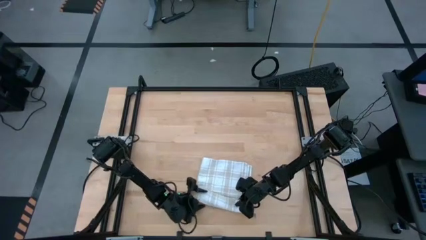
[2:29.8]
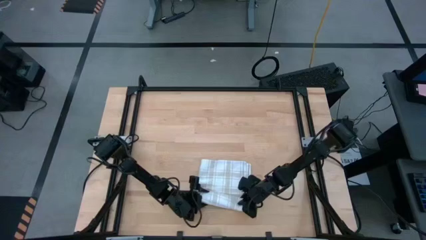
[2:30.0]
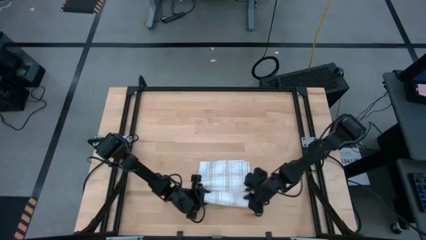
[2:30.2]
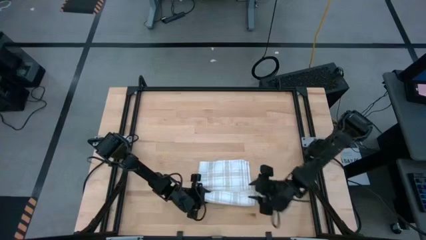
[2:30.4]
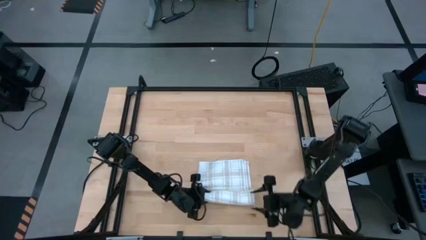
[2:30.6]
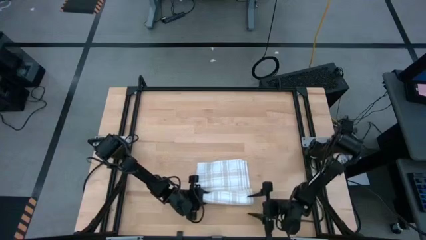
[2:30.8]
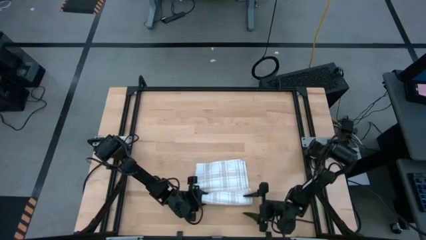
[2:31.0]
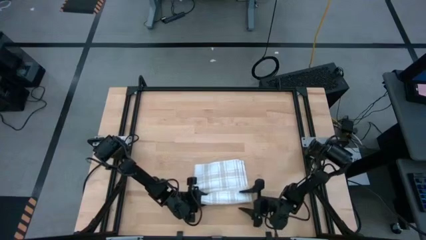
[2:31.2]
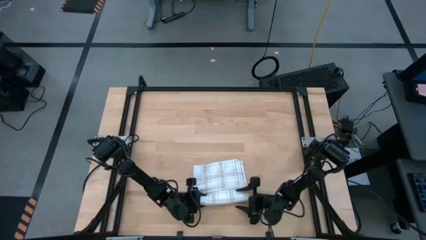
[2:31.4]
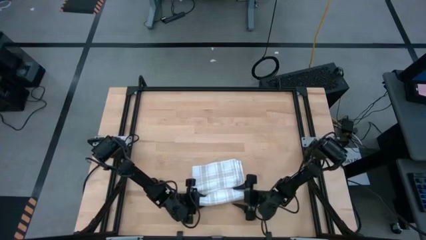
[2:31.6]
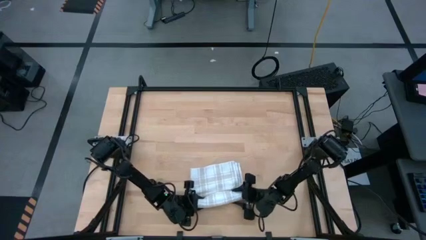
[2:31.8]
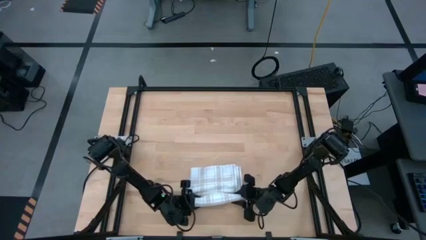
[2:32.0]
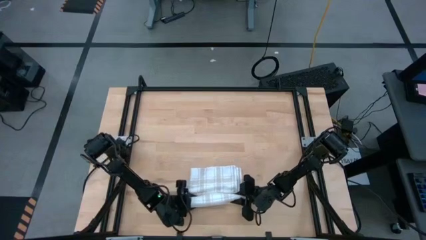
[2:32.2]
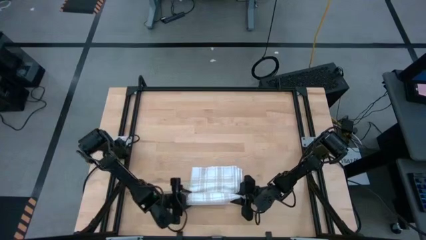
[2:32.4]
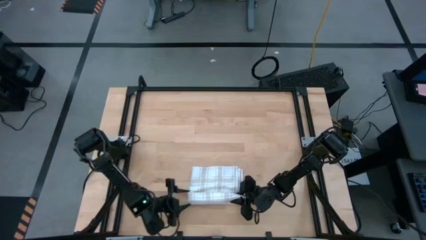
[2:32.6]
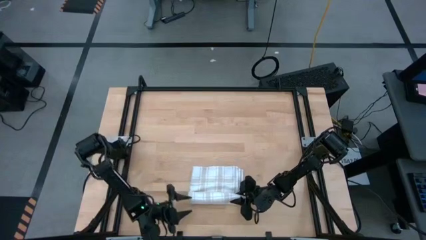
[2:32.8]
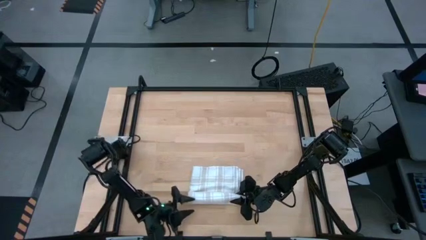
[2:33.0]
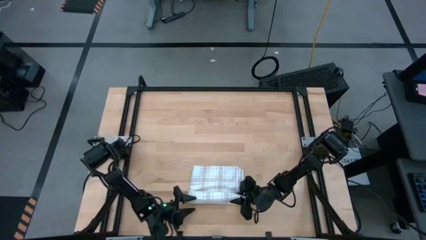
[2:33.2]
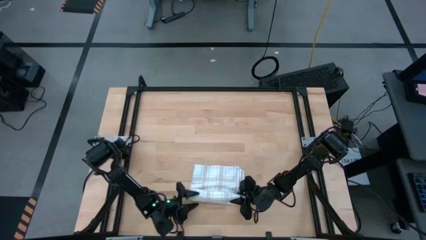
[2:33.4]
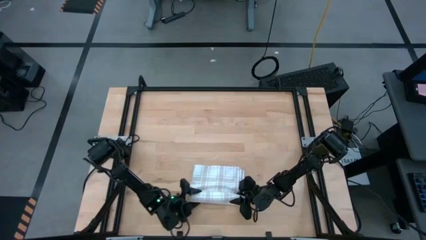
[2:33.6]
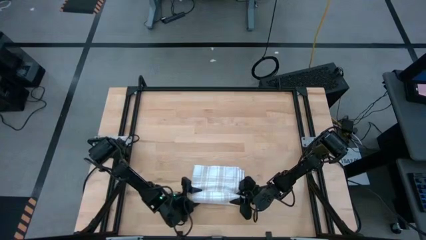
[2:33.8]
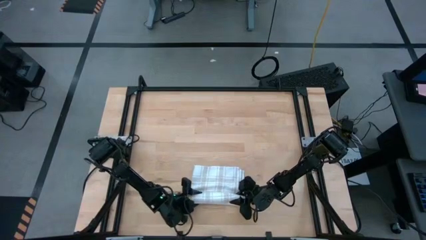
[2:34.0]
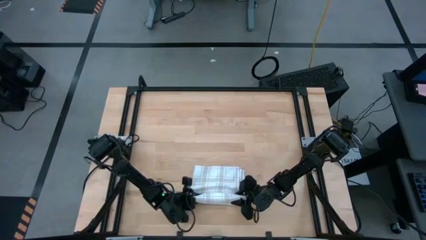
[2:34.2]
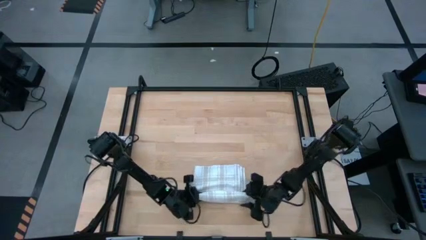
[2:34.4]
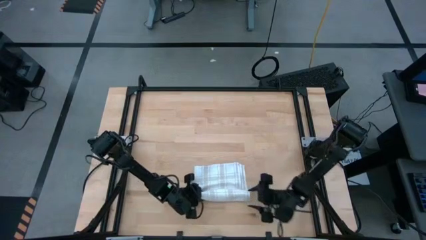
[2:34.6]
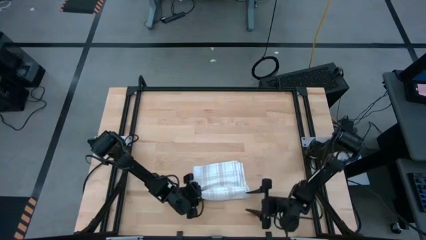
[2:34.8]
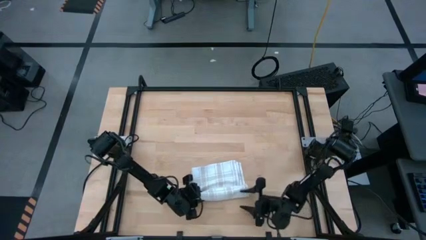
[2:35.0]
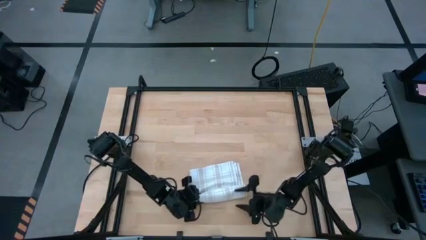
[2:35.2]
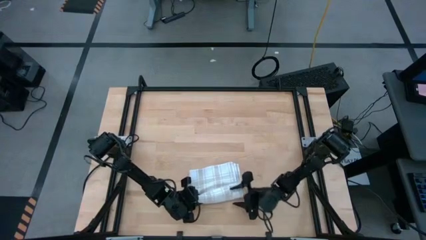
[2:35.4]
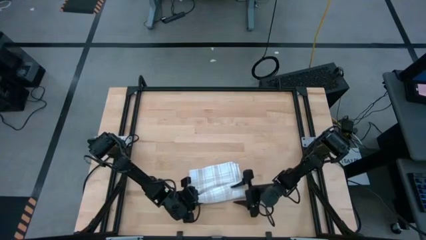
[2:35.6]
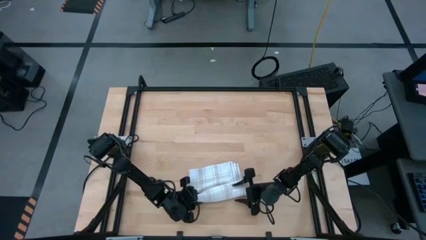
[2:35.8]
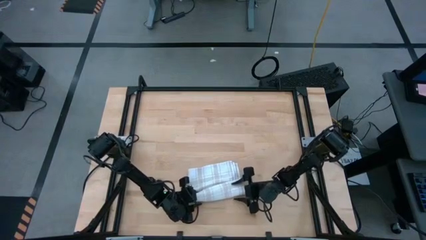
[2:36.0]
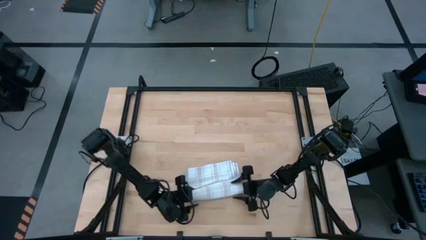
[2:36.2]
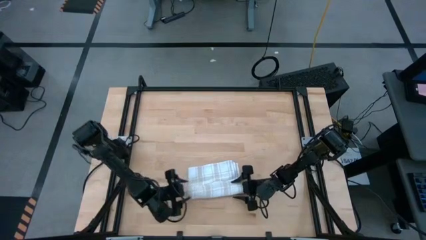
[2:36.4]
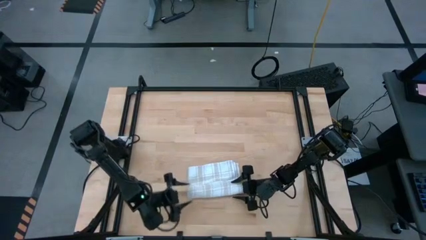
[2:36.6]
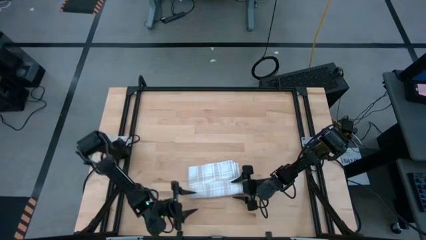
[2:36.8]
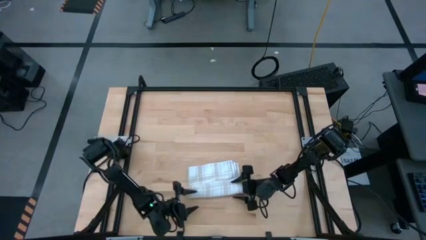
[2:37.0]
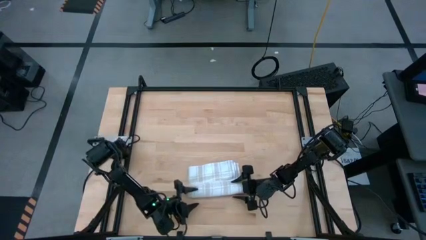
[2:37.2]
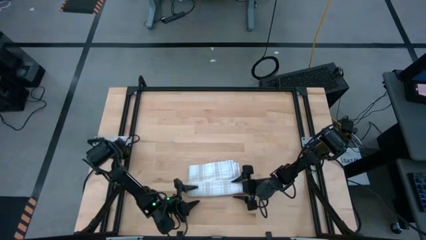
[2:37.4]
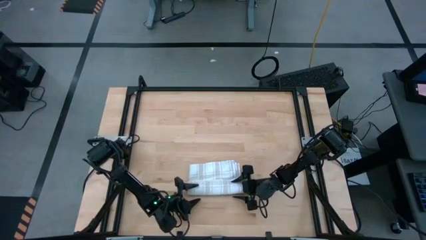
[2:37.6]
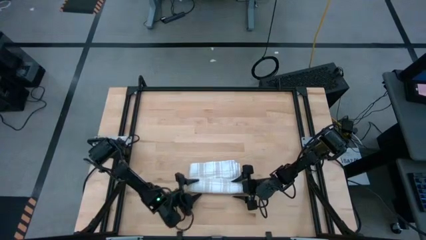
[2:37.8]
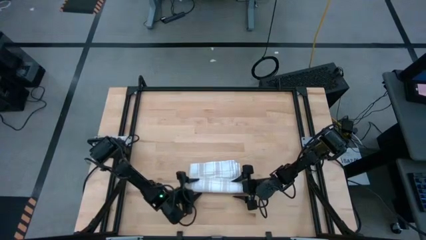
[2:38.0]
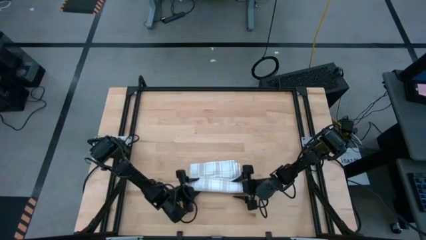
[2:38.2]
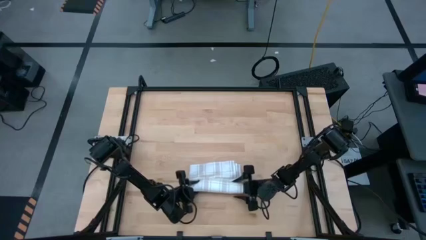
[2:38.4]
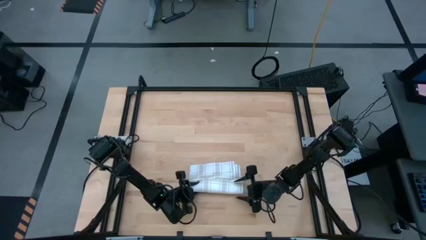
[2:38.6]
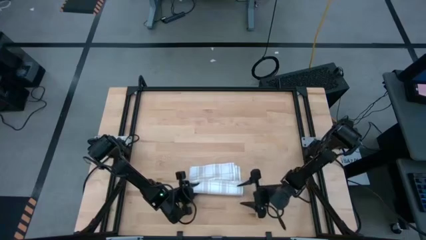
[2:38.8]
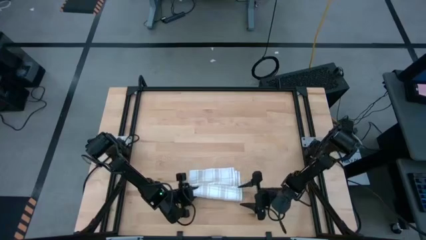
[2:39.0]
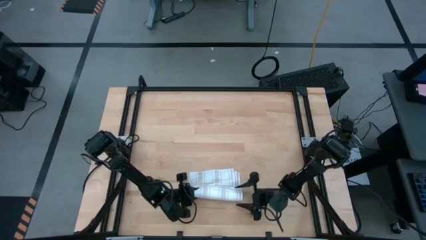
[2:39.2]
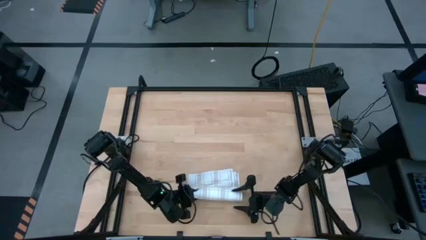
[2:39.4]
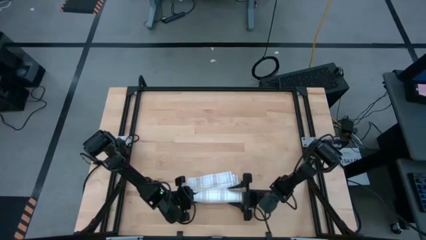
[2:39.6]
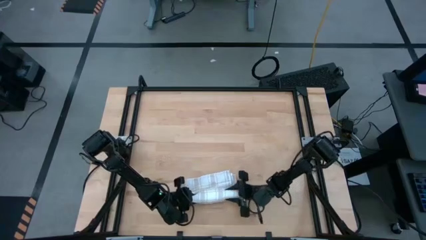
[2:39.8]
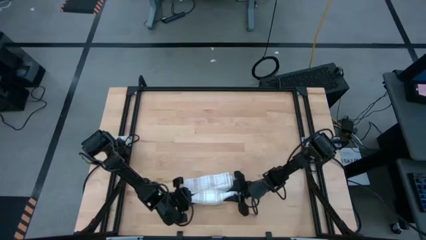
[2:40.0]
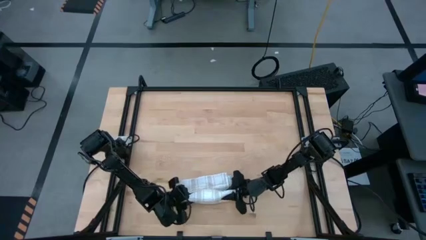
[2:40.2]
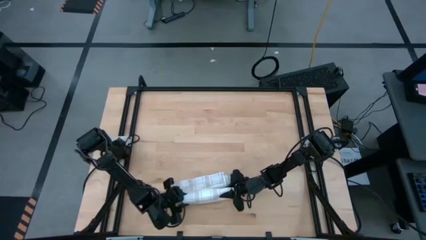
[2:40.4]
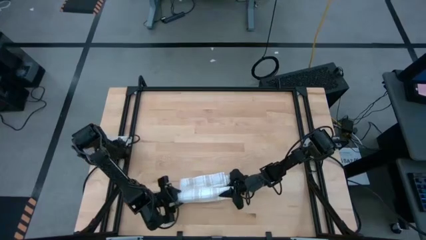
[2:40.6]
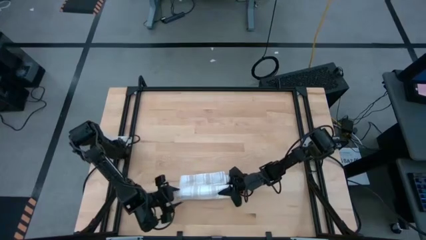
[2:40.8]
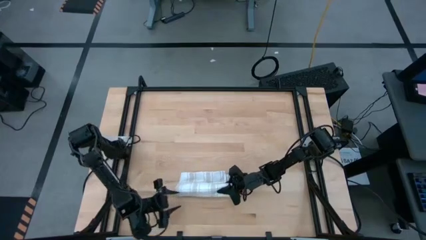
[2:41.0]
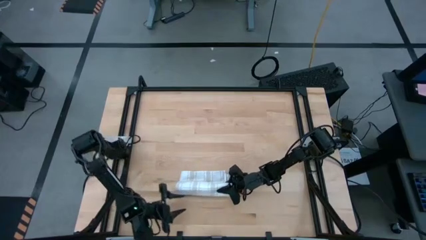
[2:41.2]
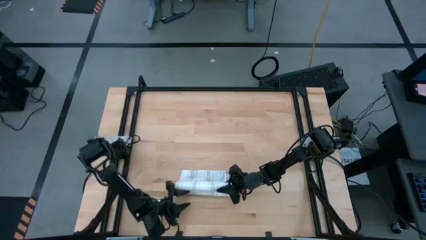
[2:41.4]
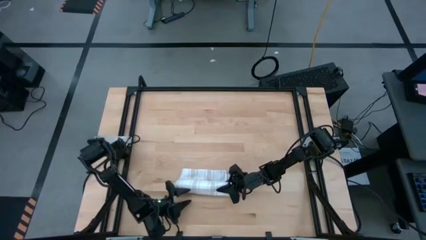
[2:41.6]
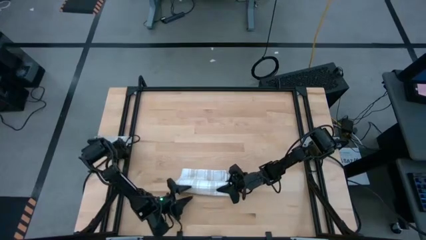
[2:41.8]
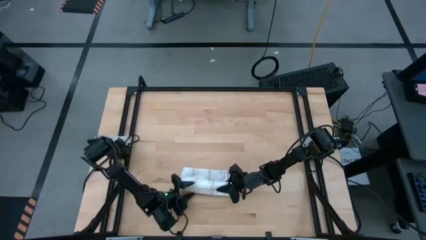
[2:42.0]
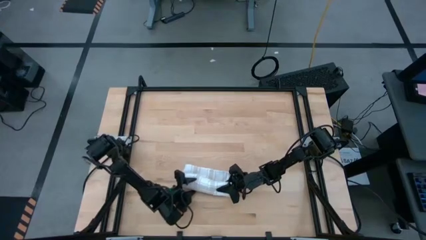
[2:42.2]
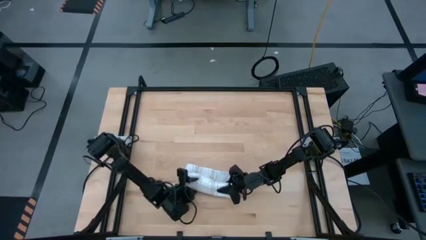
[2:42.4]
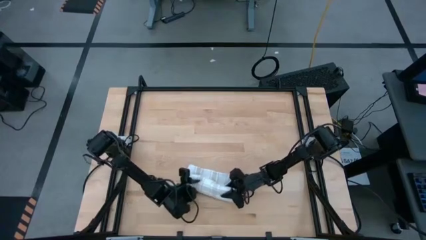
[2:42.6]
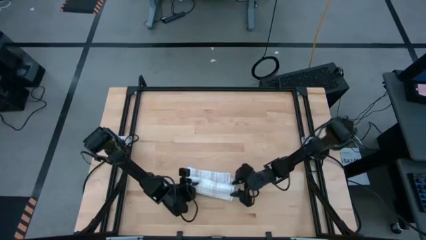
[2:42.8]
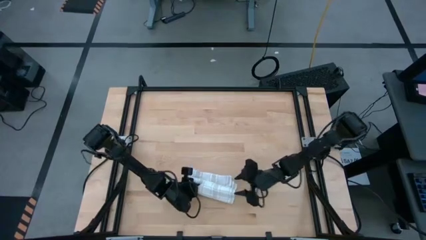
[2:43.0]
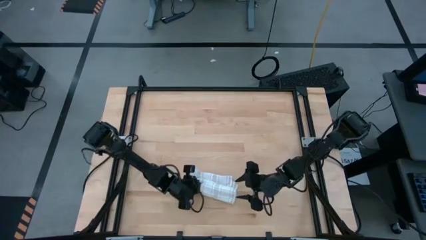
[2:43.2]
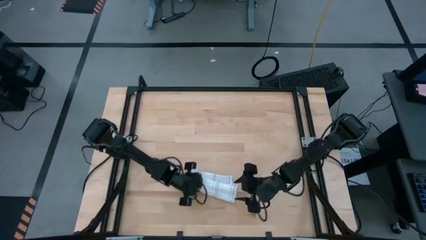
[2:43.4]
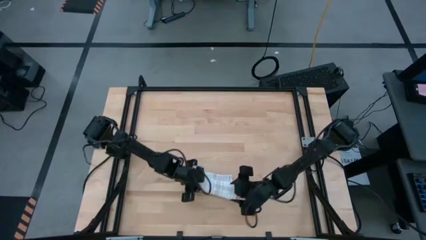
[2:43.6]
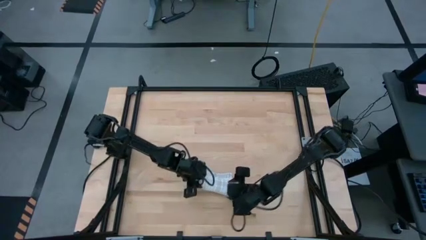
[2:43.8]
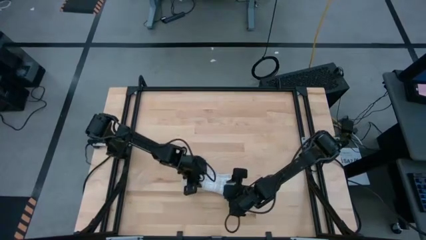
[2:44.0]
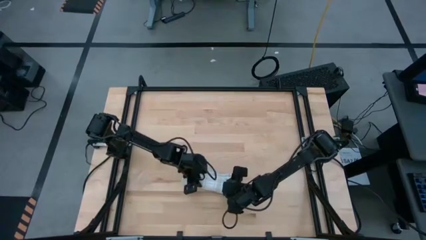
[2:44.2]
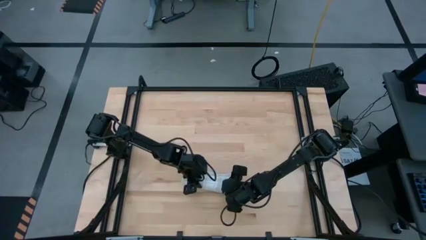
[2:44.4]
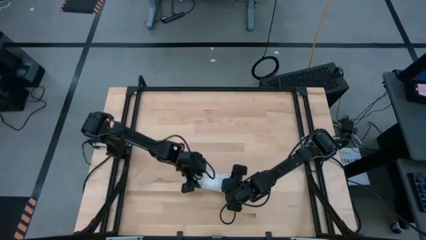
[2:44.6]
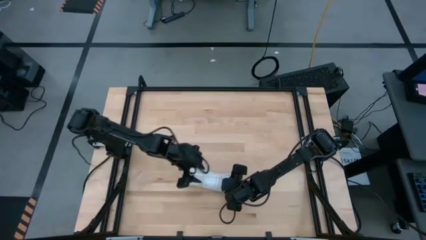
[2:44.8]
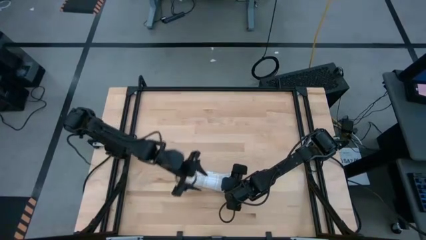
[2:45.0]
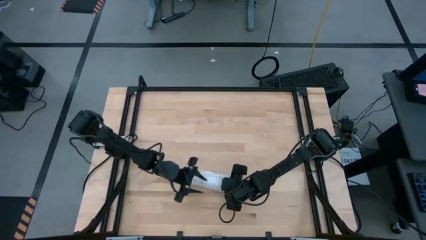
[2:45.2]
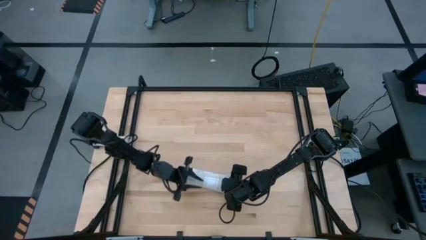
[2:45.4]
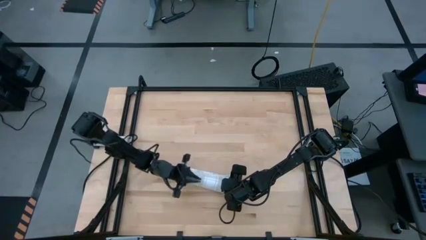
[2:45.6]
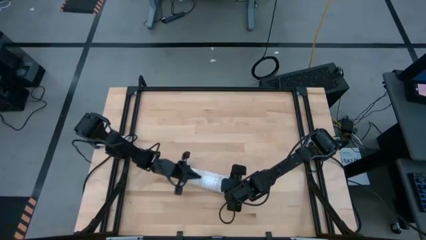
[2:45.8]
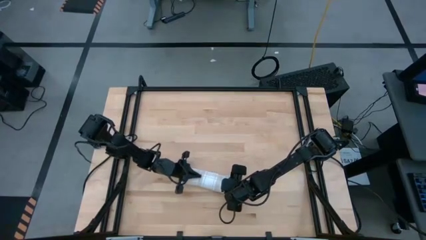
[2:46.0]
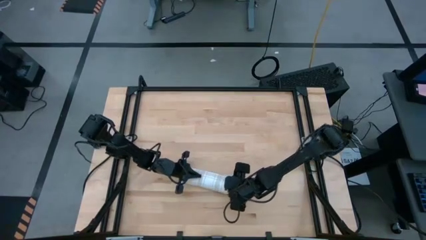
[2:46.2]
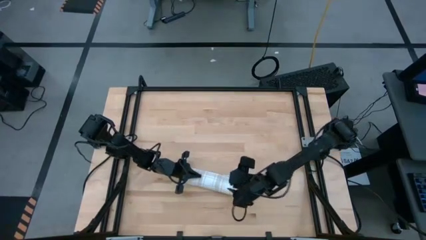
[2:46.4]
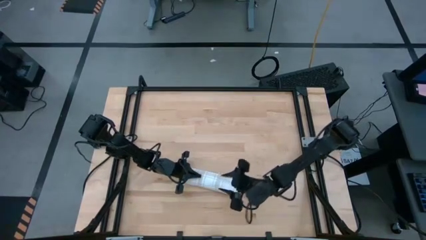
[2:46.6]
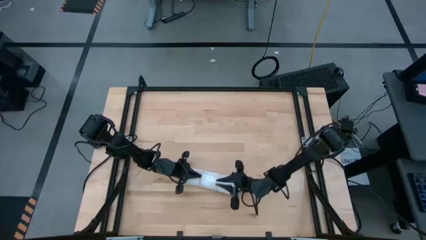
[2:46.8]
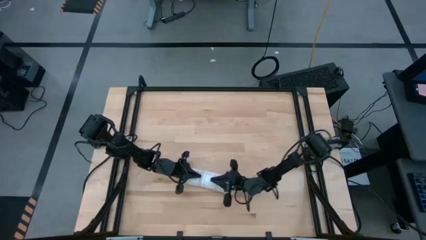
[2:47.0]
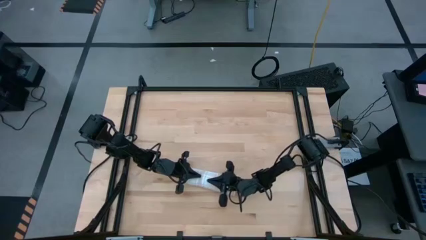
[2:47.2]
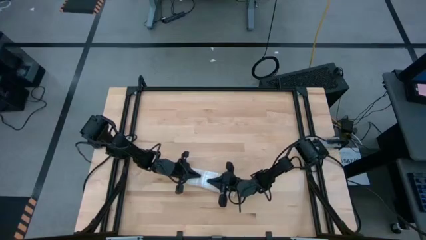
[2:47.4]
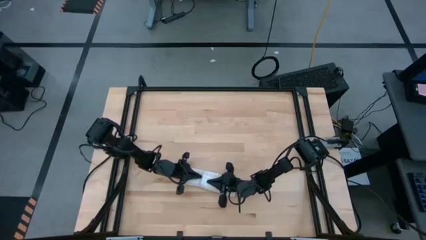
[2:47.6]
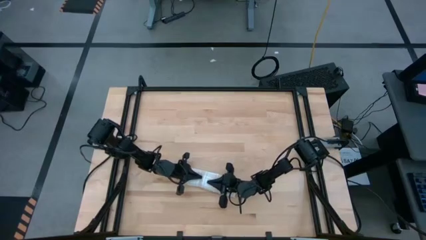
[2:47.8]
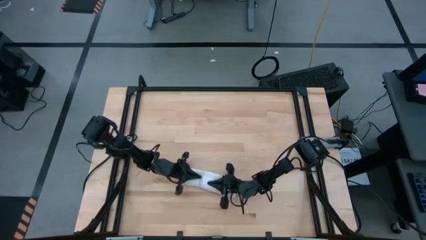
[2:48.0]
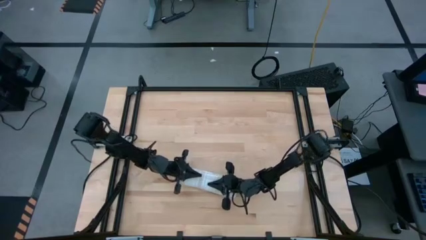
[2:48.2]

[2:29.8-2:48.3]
Task: Roll towel
Roll the white towel
